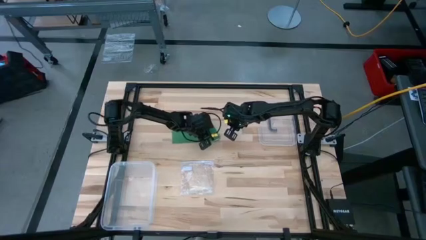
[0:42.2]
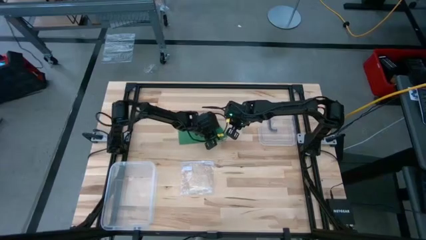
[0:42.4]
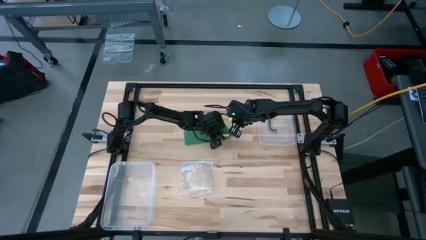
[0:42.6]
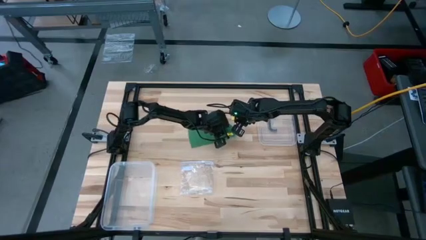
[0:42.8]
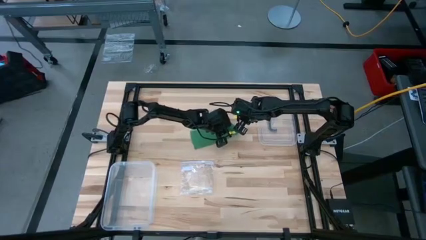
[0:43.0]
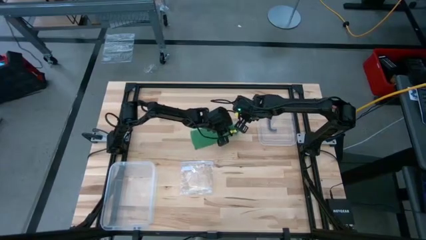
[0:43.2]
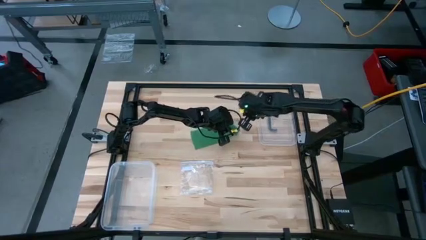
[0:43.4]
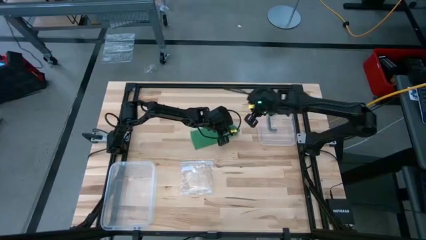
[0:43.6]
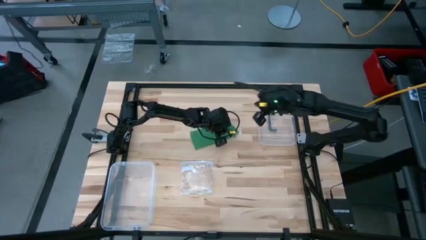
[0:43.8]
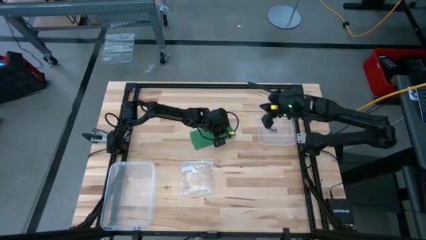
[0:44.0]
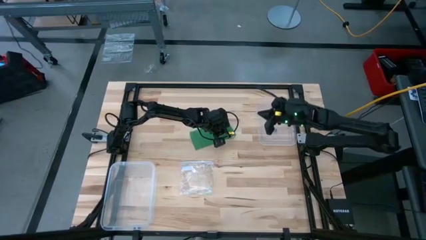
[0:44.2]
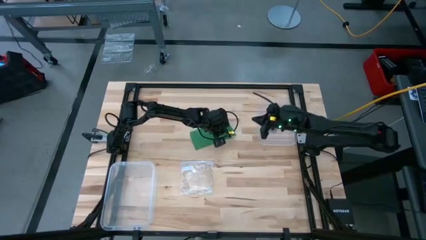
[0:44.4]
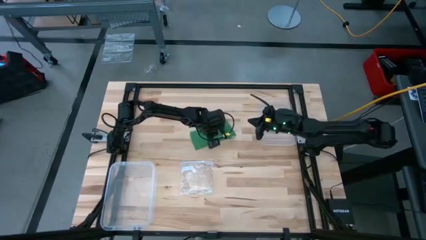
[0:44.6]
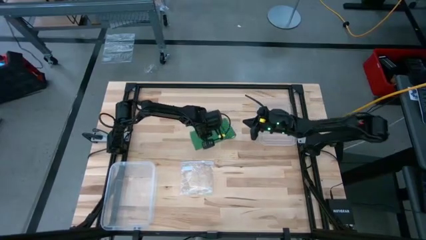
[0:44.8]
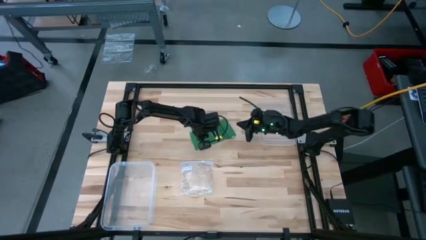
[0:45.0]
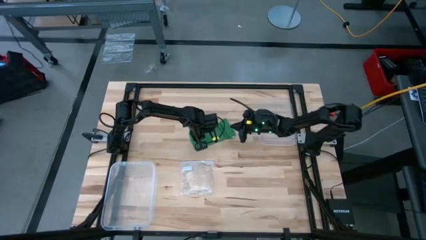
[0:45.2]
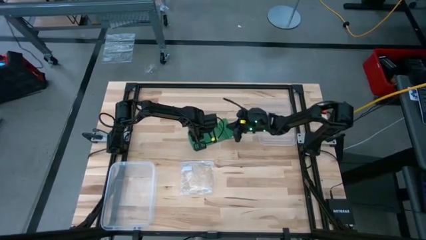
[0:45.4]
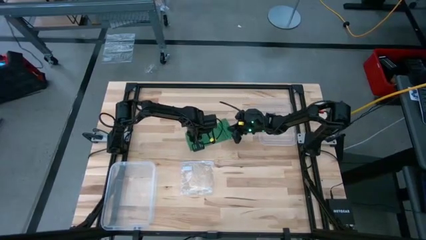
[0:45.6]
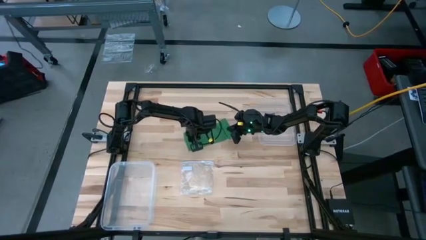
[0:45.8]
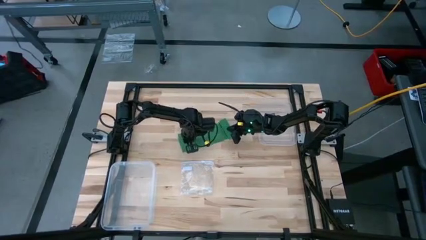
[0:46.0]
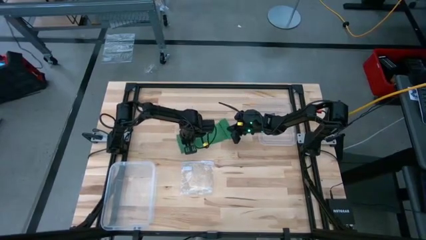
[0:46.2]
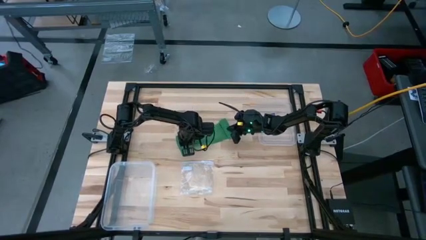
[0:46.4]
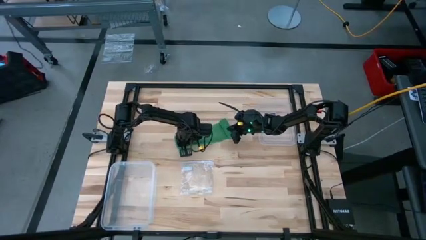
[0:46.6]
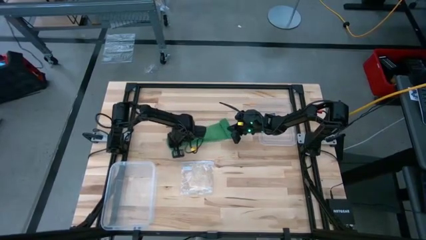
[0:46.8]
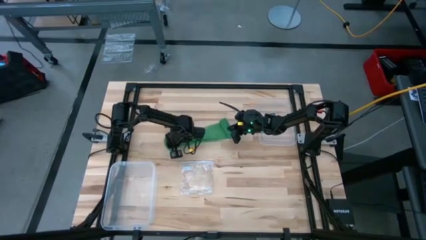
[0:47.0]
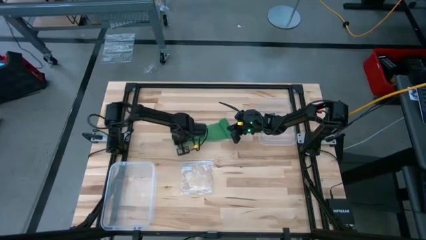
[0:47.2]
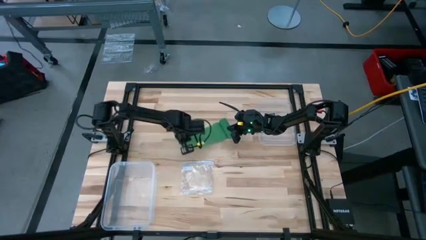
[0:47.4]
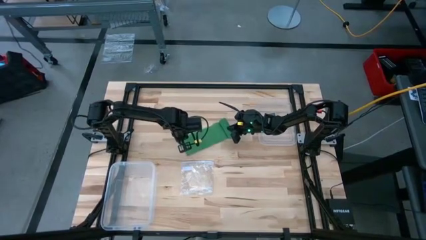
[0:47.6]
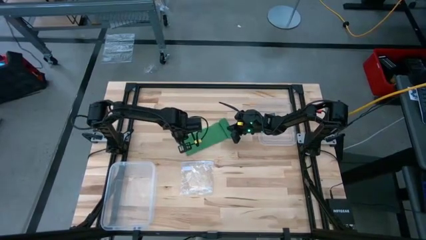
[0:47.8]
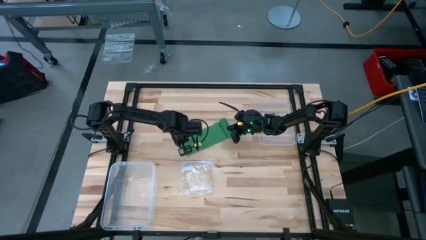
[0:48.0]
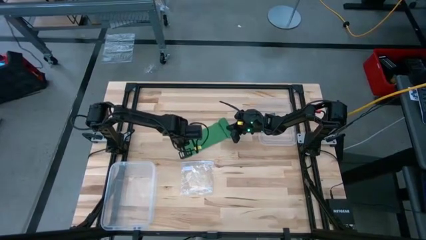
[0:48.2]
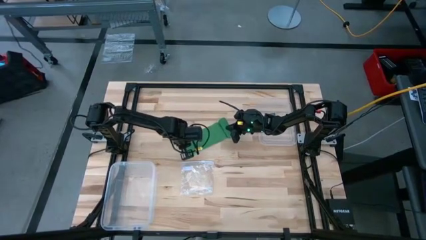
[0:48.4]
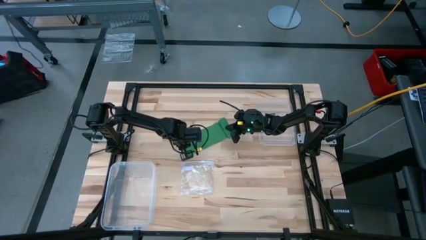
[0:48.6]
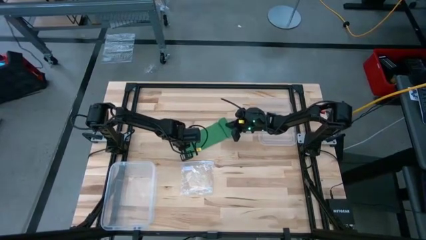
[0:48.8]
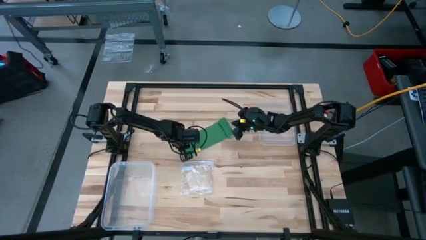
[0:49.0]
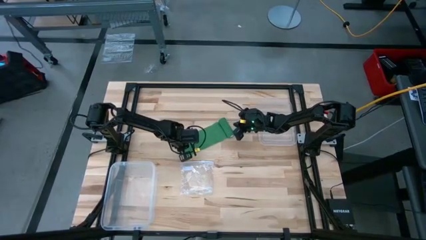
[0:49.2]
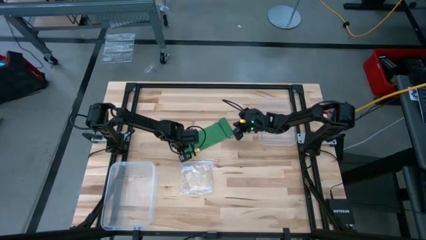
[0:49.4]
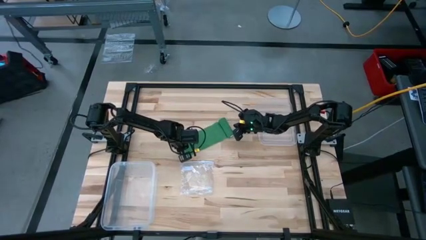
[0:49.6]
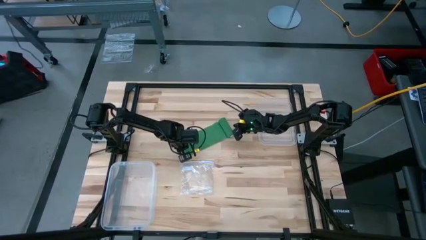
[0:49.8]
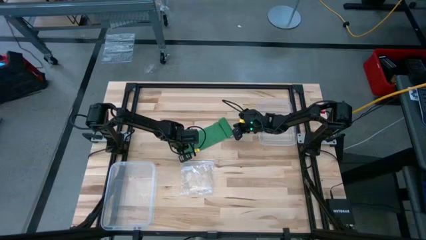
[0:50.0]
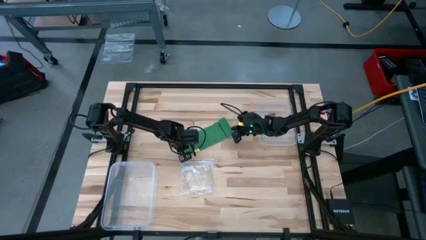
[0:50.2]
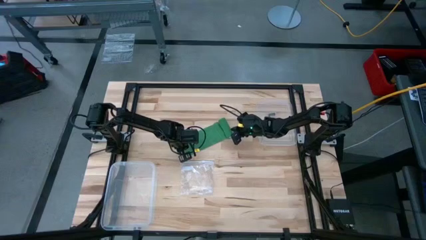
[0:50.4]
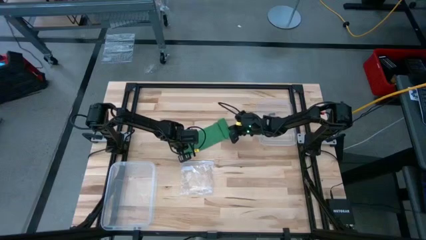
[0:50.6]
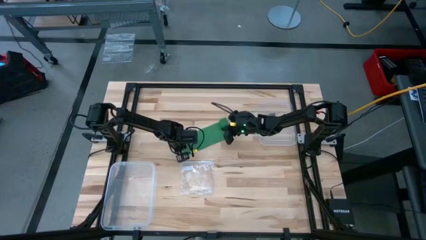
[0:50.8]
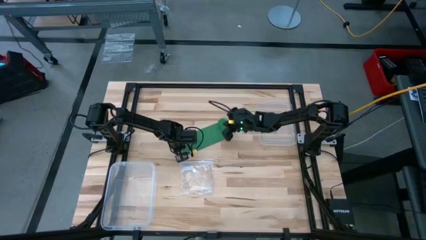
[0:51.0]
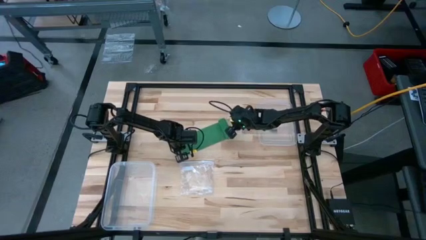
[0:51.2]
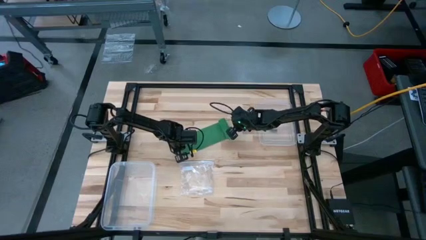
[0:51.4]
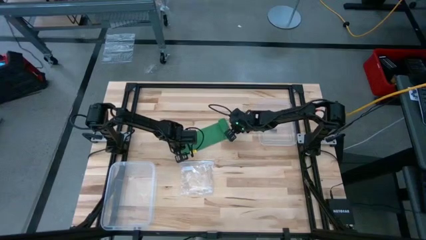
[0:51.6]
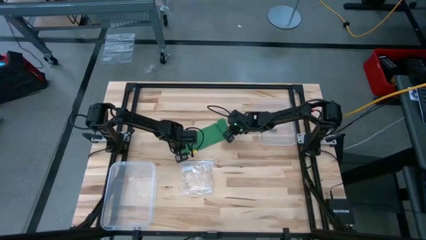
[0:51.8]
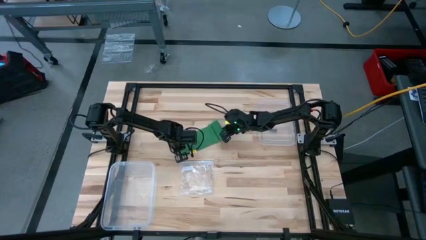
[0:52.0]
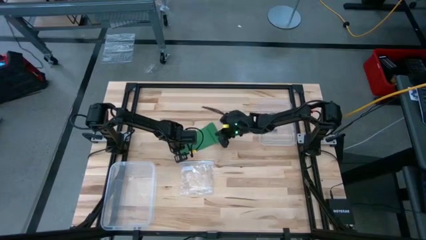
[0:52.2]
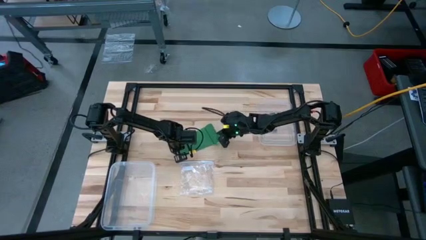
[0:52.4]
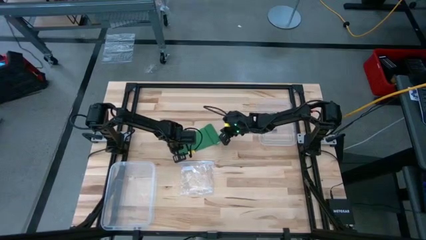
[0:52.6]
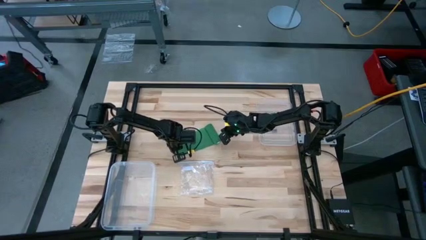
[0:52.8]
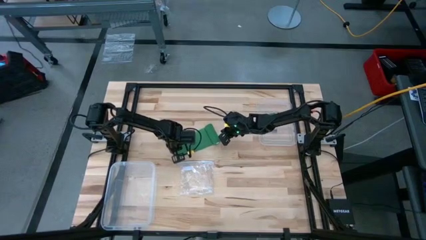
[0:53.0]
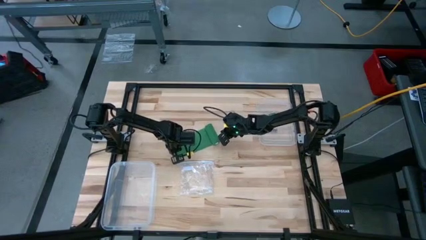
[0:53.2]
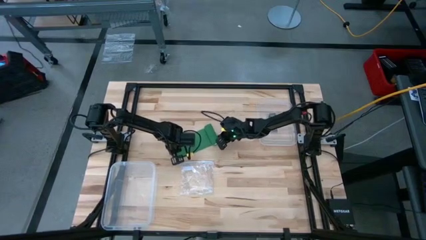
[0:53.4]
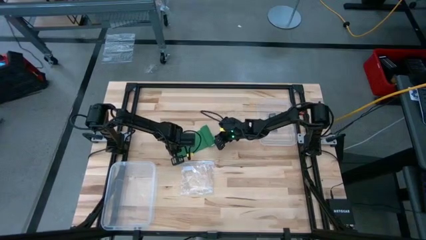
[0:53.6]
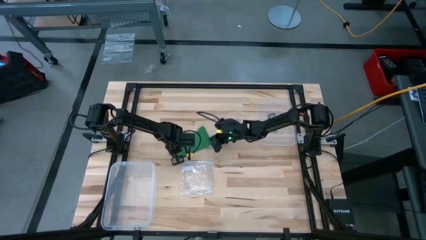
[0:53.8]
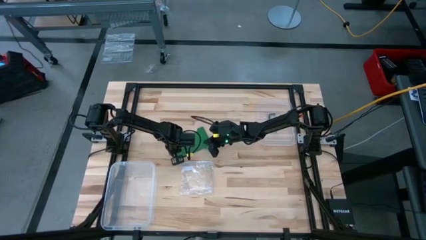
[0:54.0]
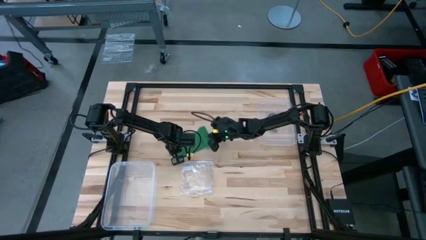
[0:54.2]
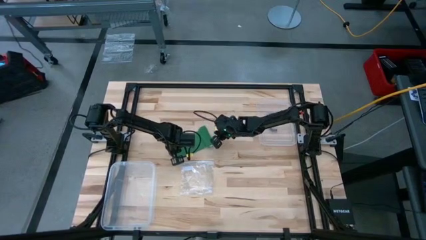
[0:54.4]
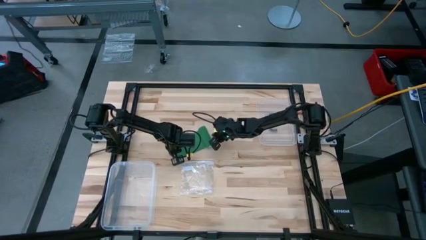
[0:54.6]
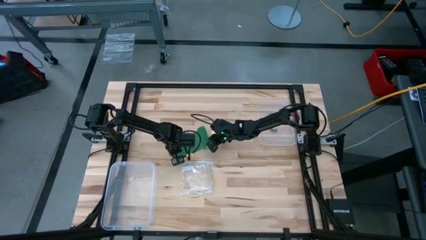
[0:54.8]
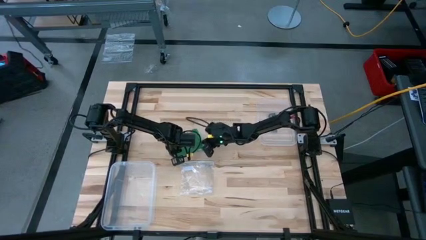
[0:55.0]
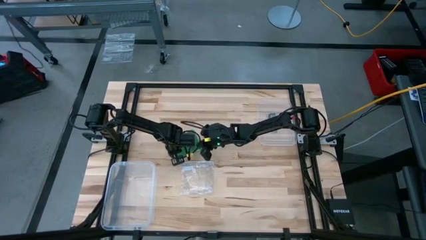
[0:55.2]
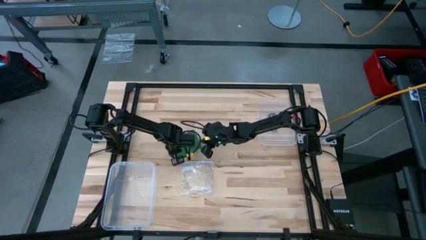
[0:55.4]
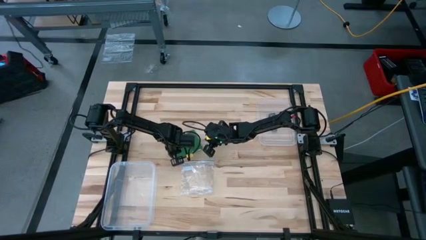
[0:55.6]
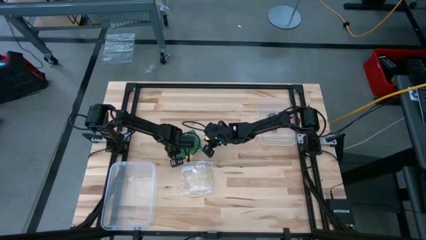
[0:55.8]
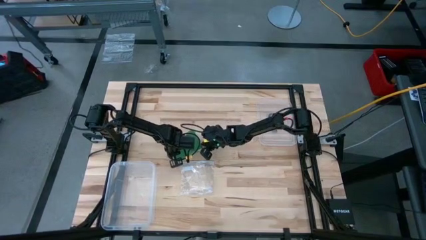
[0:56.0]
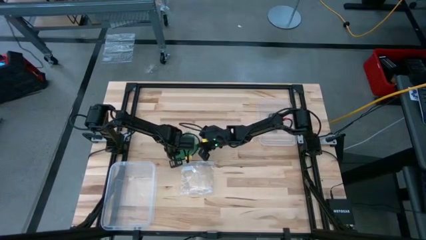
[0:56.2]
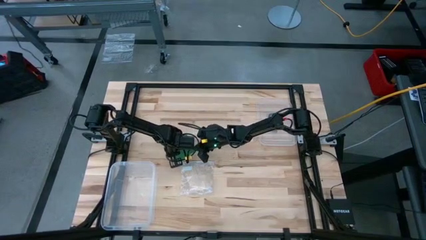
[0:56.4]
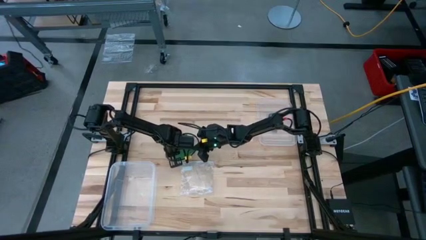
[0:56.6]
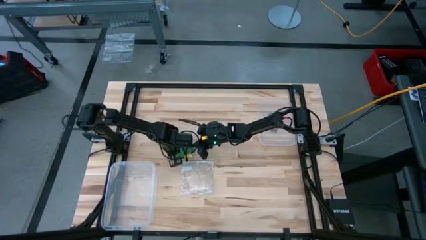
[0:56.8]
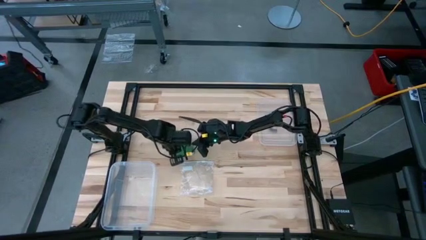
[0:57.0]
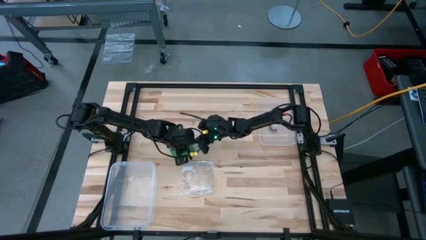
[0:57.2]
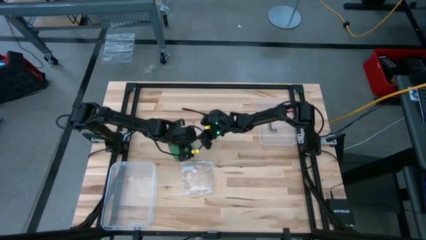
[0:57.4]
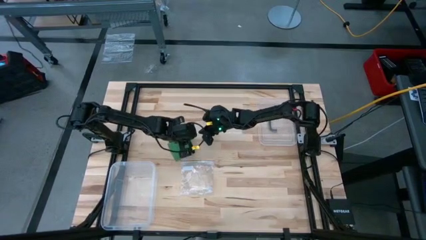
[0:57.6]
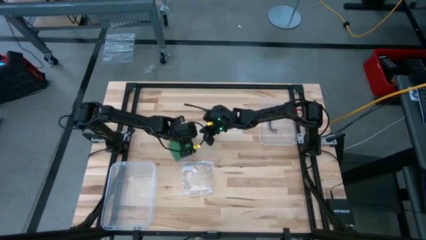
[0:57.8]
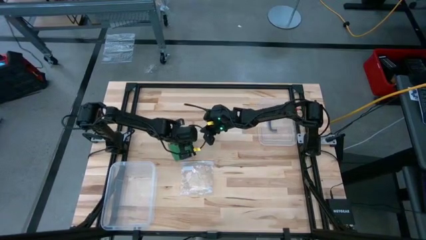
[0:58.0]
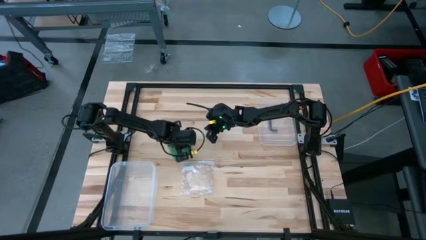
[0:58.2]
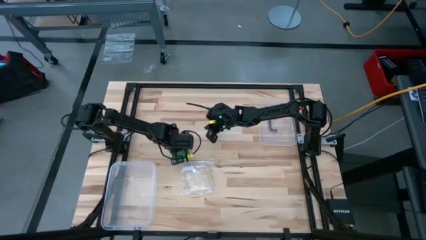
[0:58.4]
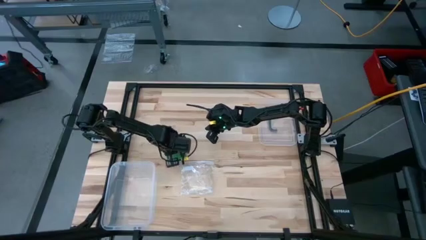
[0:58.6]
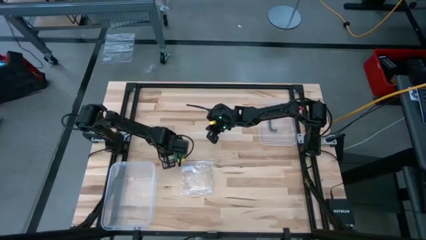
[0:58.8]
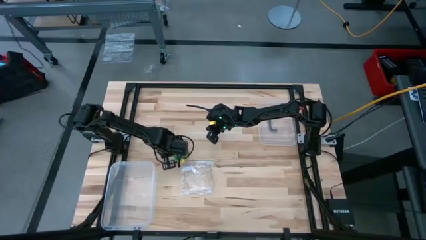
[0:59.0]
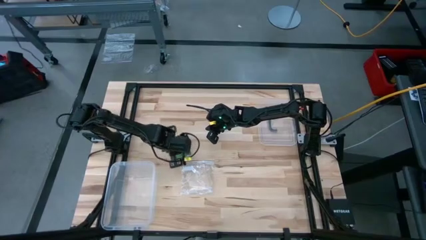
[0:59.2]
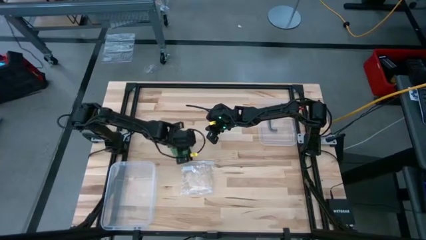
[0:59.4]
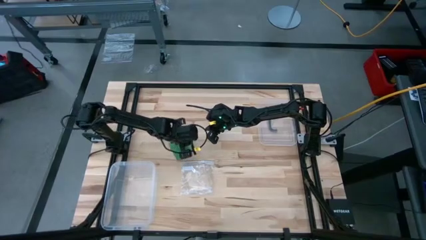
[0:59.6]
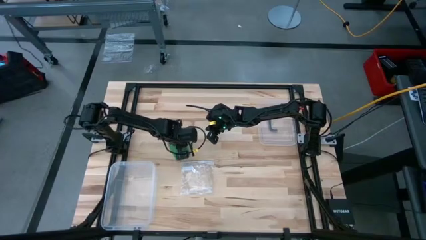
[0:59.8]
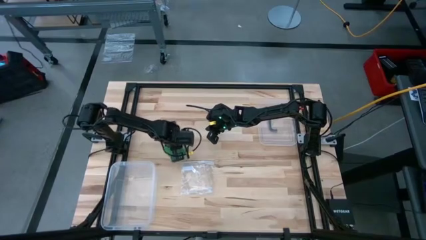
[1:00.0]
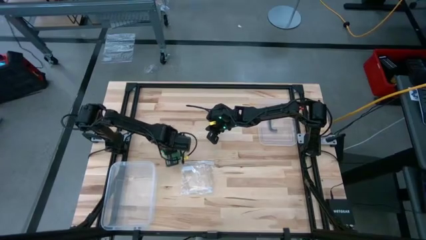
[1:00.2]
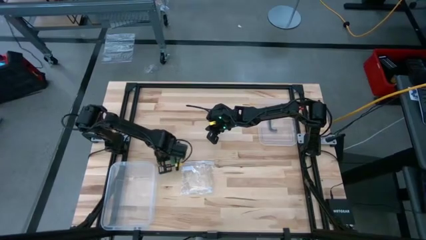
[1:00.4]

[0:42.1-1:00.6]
Task: Roll bandage
Roll the bandage
